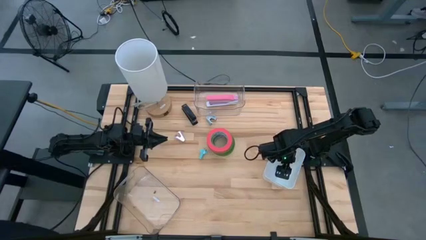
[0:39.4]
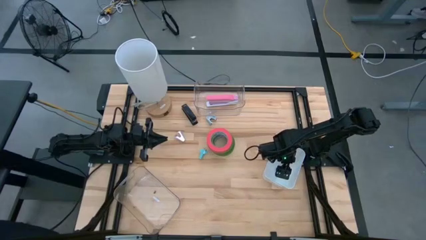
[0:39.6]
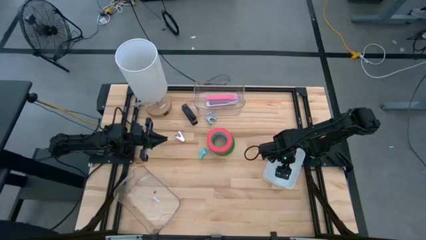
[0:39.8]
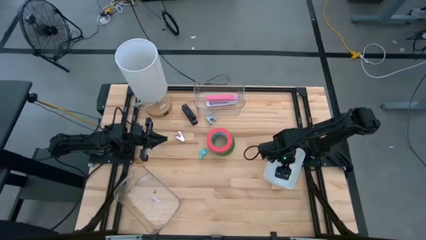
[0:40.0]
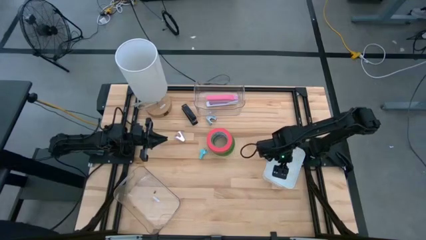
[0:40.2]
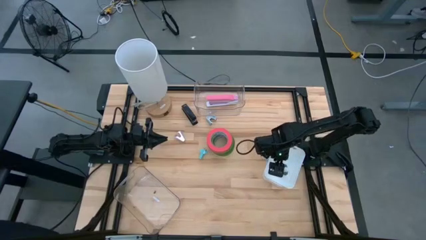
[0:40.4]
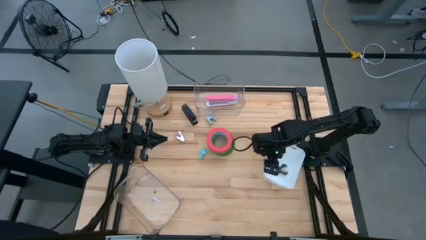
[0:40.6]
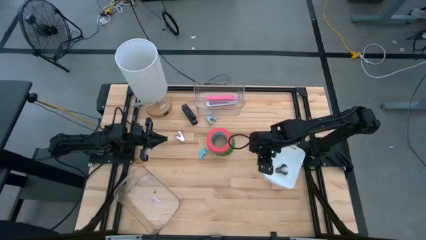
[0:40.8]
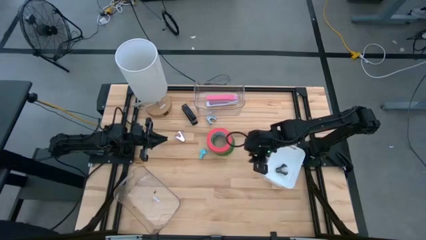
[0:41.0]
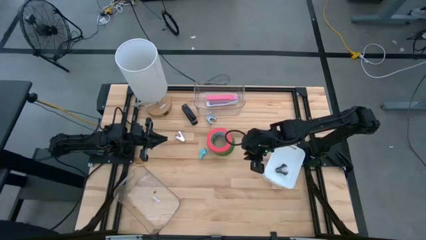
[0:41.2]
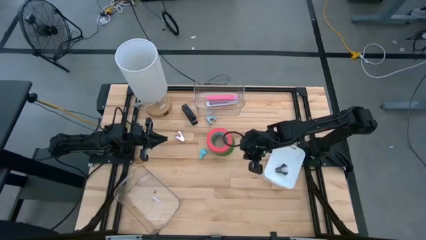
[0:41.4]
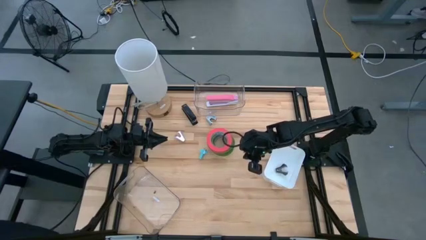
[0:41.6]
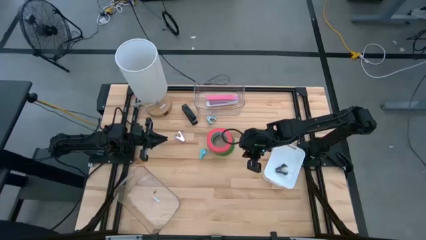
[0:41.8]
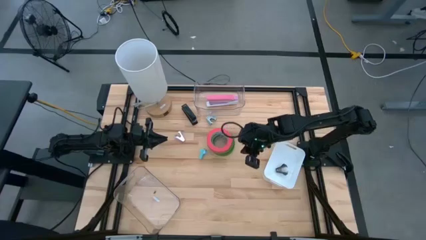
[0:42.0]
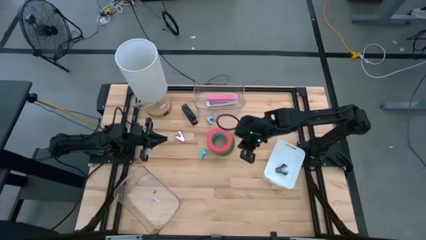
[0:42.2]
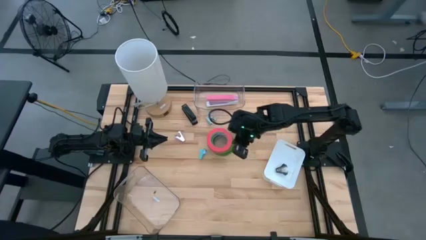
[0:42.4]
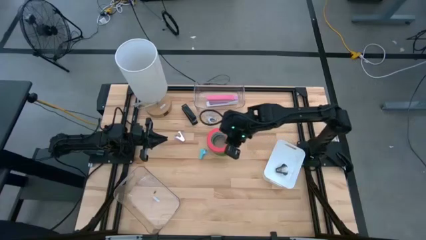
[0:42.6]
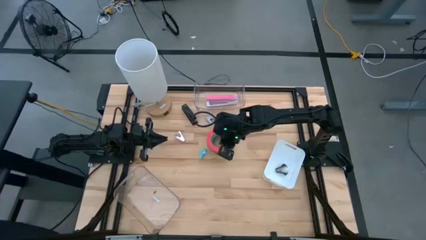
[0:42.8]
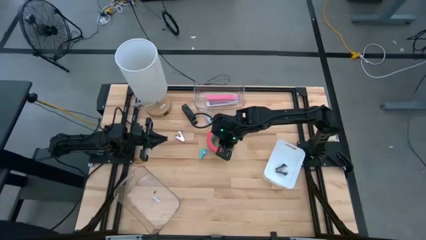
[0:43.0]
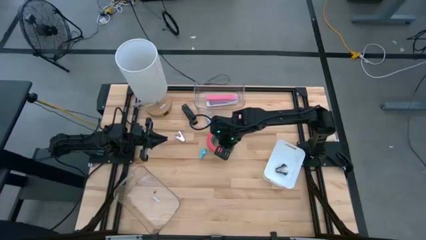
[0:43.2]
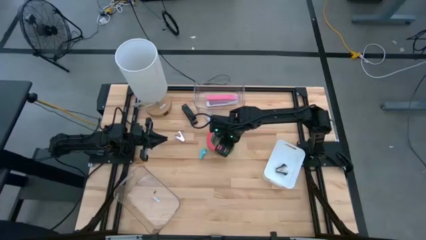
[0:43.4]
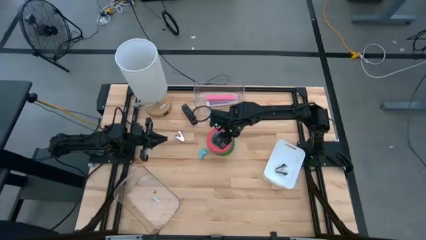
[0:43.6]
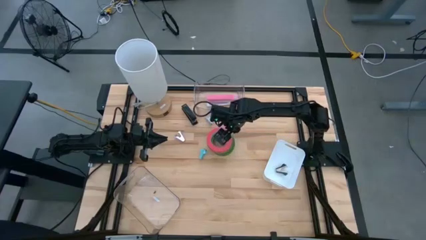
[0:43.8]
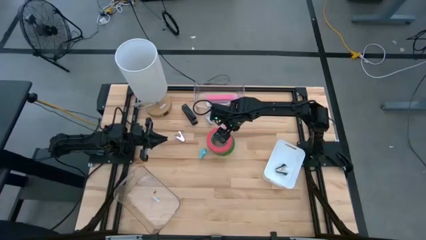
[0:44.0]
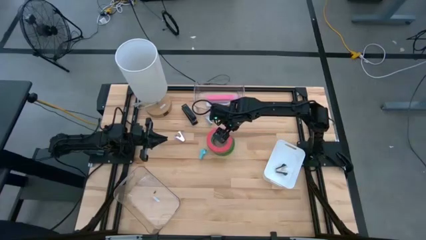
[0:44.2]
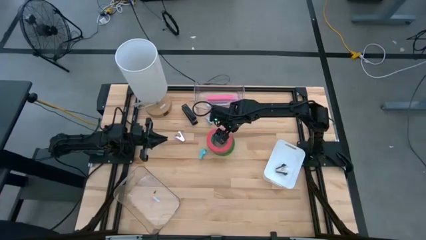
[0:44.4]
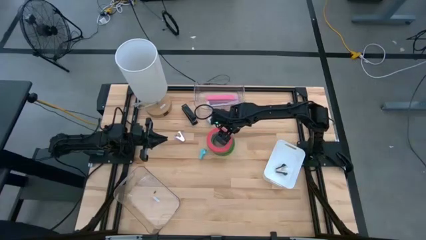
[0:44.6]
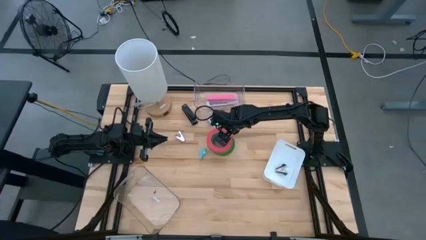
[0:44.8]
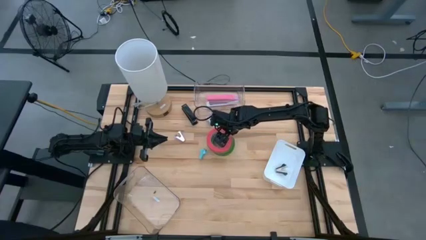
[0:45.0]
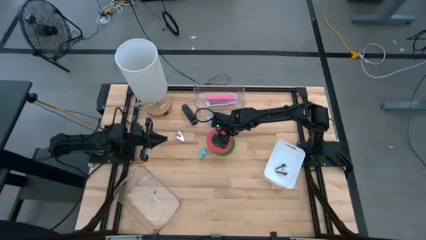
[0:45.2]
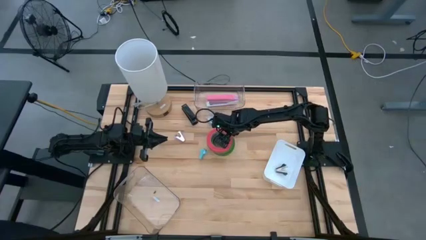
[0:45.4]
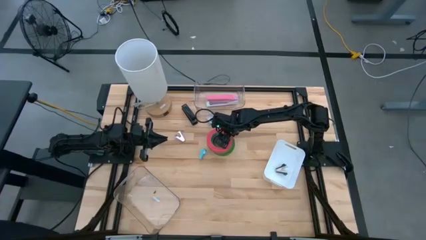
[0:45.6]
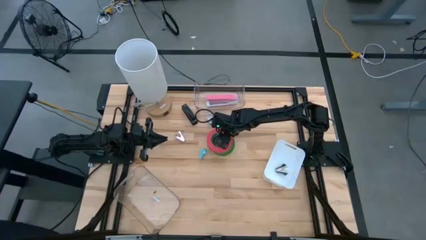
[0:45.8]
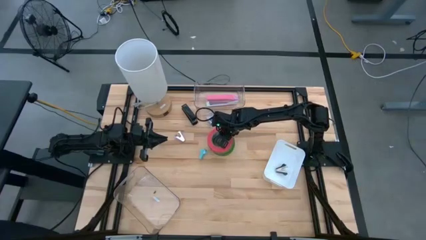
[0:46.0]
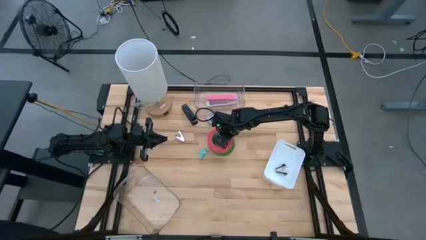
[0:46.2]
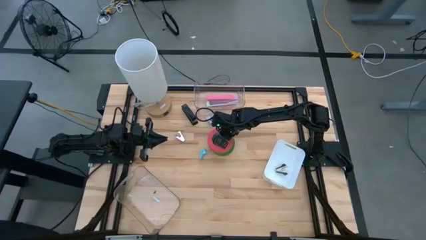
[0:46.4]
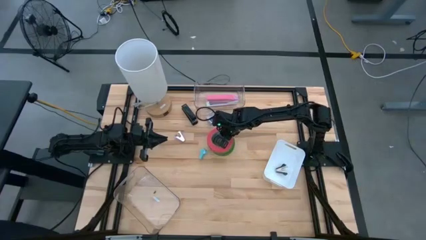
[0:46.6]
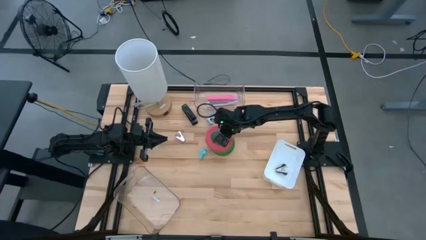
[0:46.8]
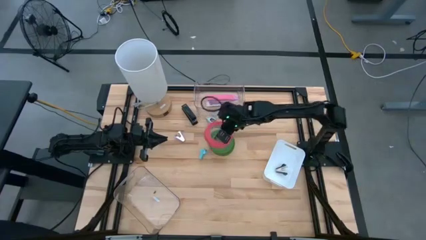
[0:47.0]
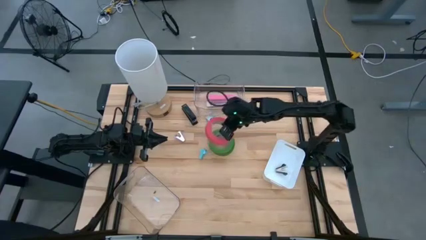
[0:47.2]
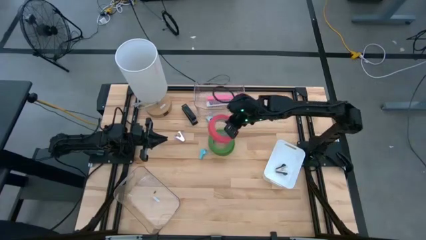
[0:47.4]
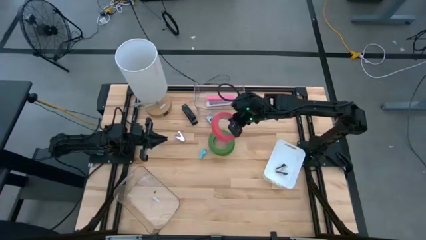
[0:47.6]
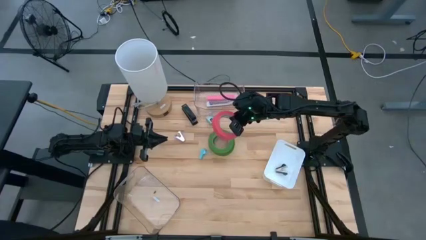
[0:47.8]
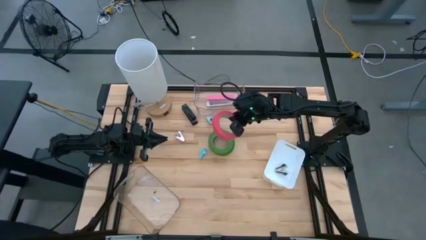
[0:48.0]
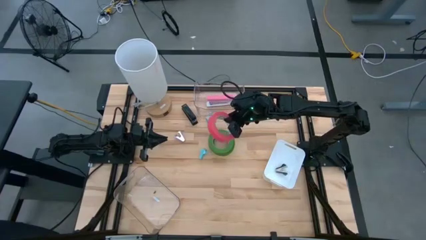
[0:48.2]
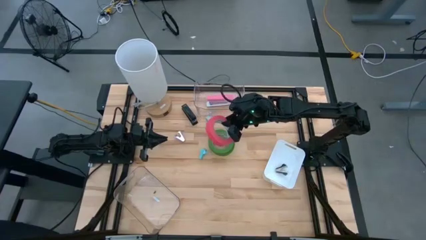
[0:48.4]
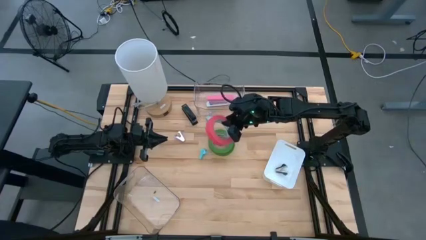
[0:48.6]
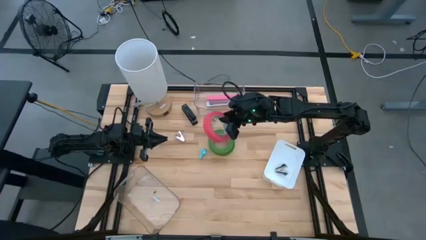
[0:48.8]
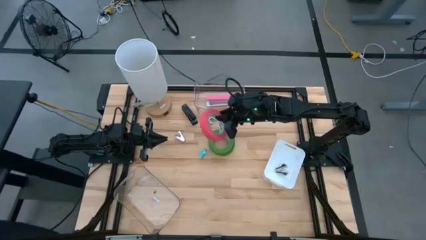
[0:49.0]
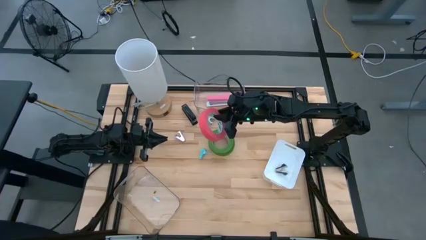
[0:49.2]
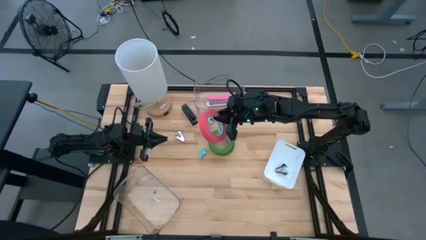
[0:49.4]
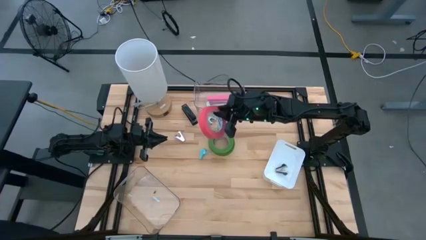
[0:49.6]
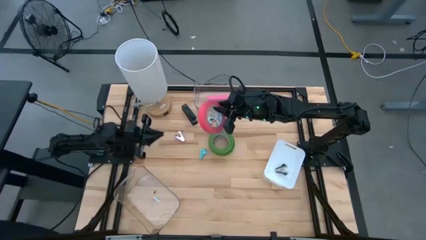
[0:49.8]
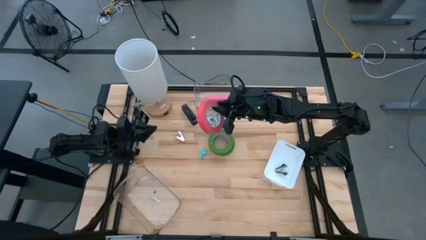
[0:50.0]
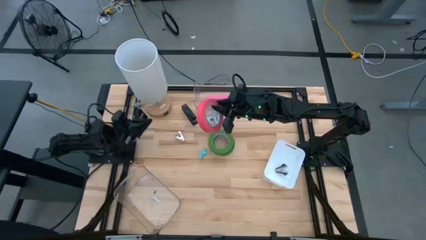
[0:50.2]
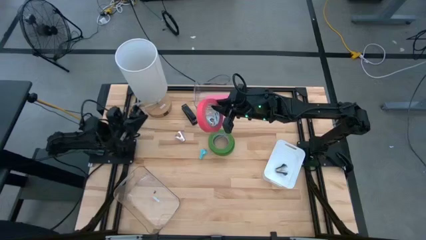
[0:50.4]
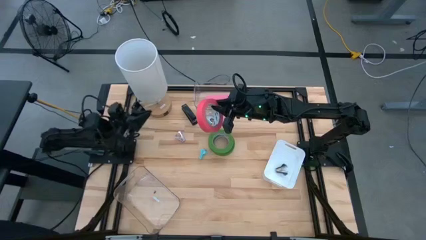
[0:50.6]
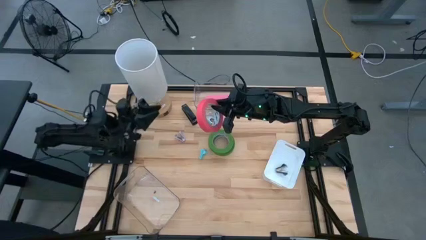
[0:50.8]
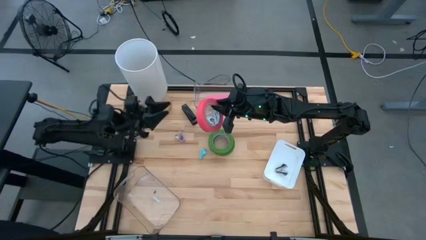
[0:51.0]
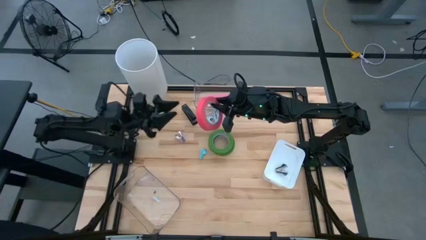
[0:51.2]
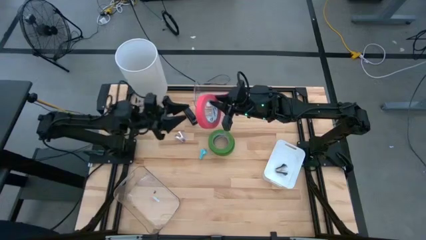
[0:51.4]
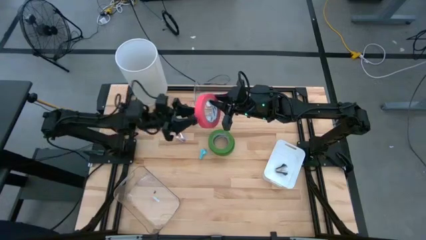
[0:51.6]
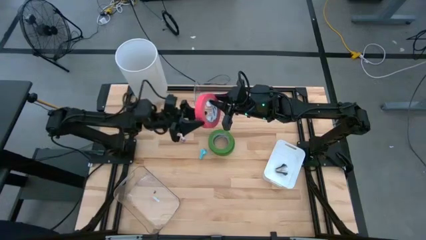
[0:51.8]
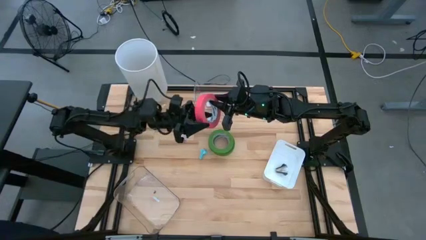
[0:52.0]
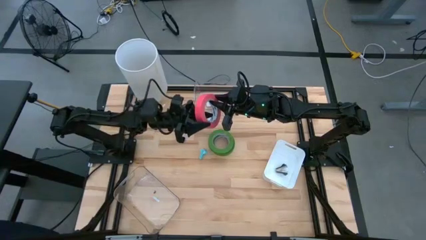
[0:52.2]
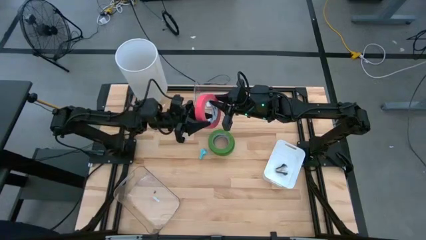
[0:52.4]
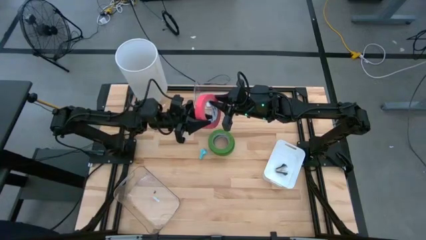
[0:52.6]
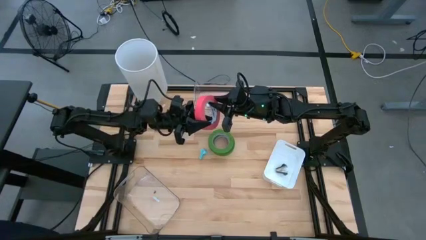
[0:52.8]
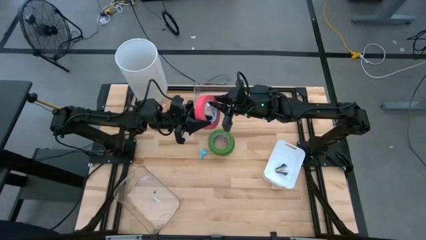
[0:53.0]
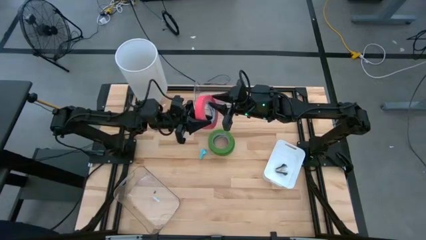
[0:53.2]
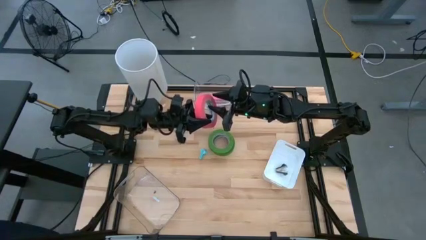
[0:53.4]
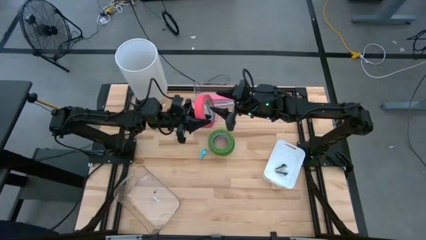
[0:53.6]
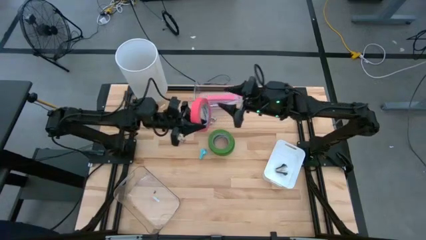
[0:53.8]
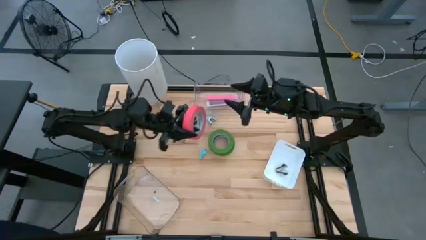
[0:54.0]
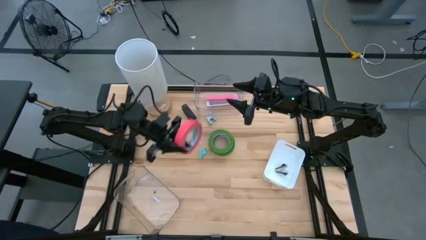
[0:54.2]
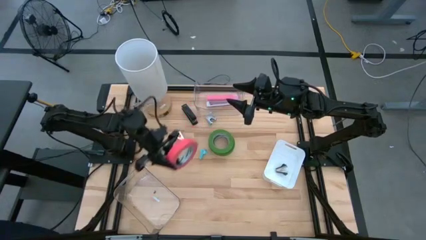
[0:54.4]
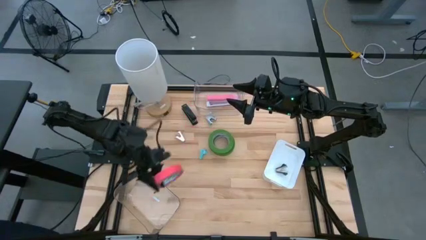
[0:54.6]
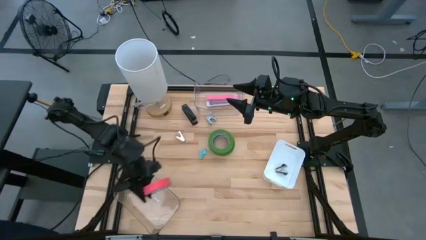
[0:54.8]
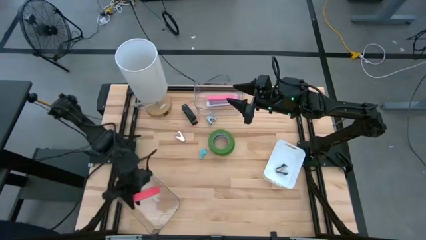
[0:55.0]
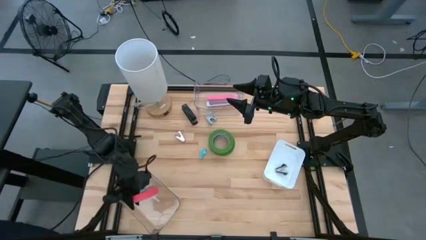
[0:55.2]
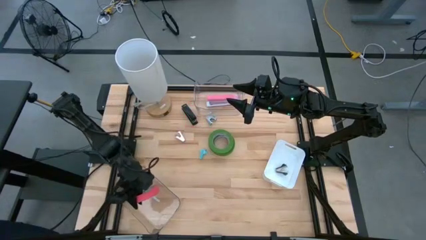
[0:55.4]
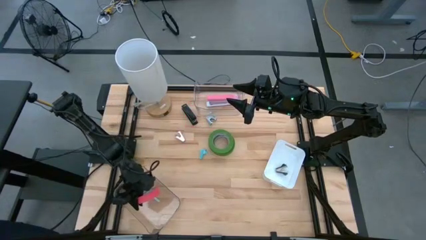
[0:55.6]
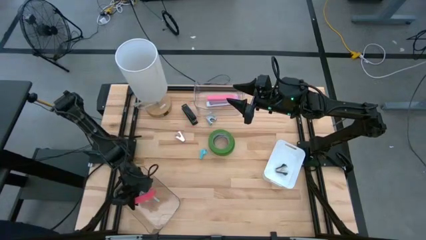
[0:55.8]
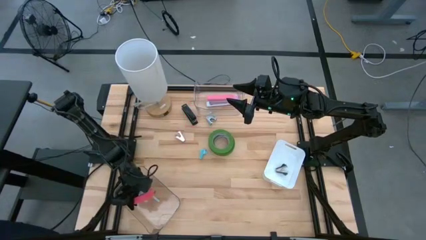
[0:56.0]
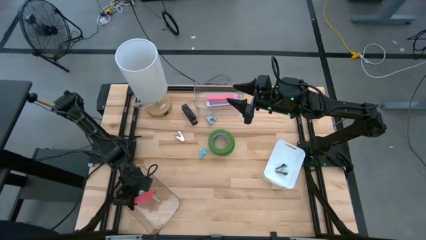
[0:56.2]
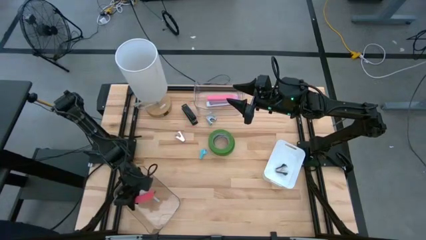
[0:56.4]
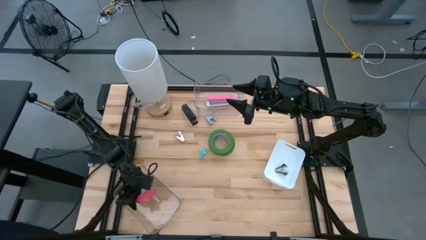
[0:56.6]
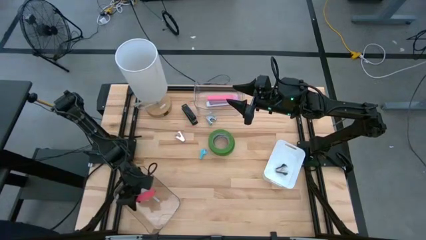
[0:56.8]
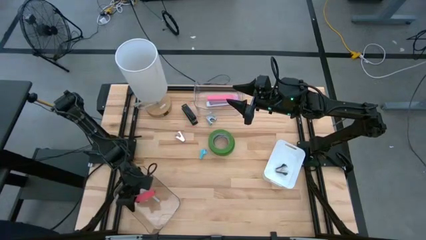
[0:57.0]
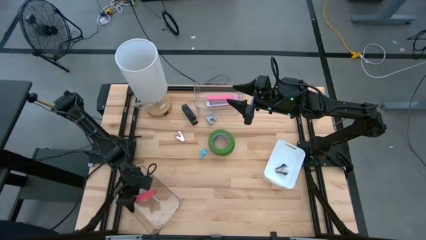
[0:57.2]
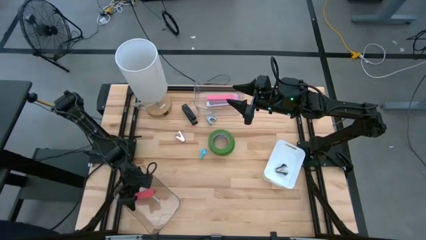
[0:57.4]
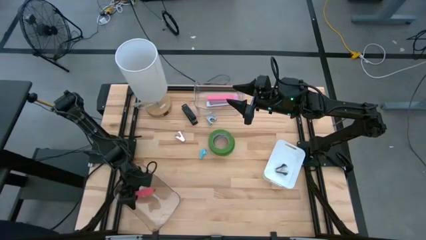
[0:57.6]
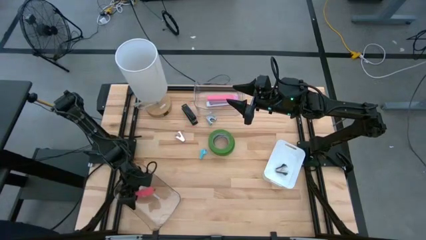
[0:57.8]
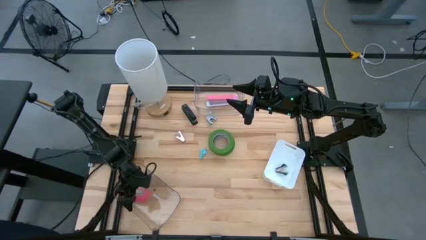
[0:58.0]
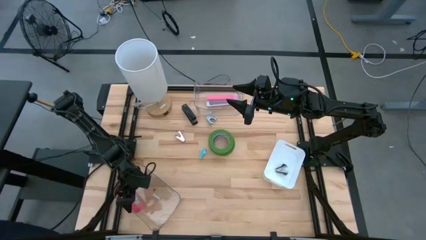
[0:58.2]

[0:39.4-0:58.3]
Task: Pick and place Stapler, Stapler remover, tape
Put the pink tape into the bottom transparent bin
